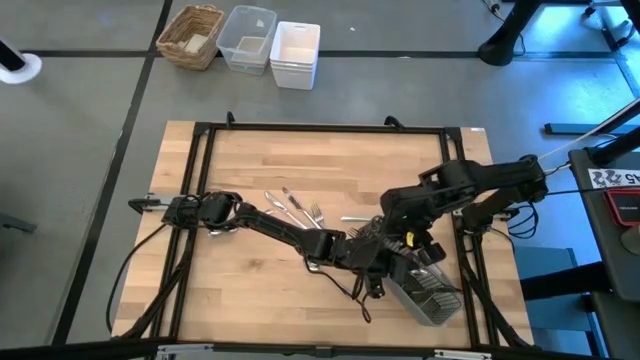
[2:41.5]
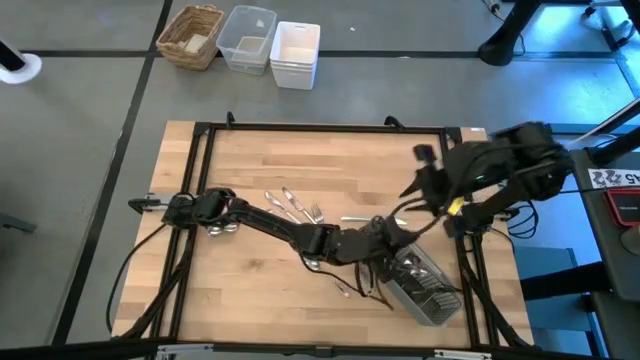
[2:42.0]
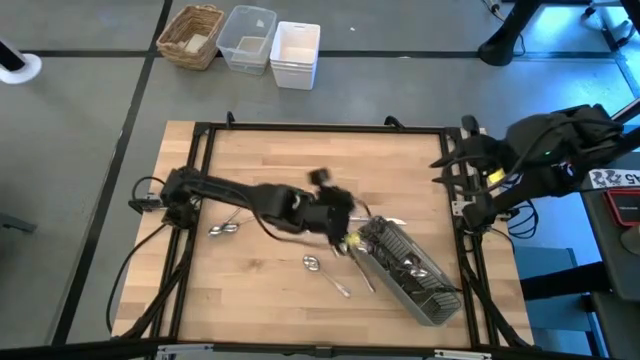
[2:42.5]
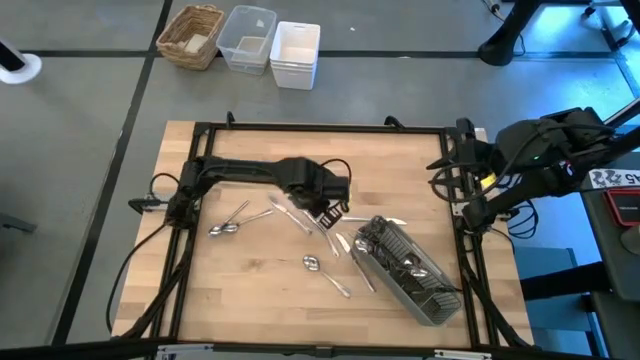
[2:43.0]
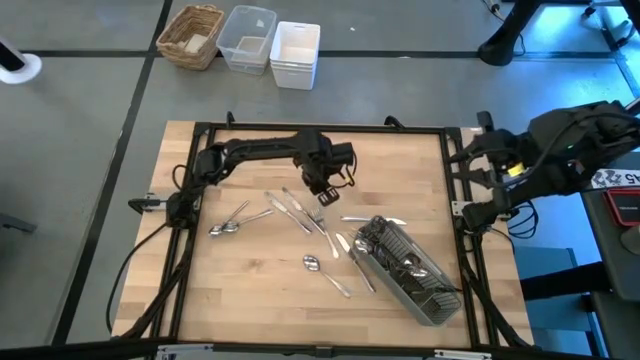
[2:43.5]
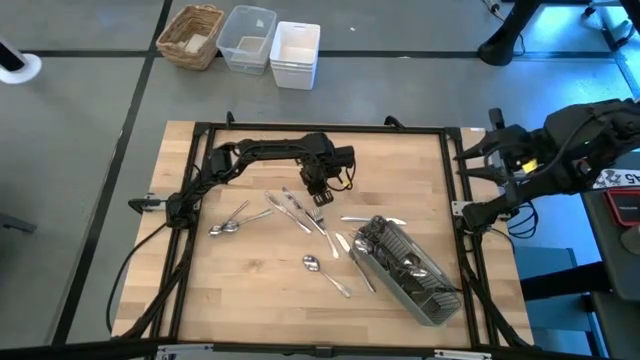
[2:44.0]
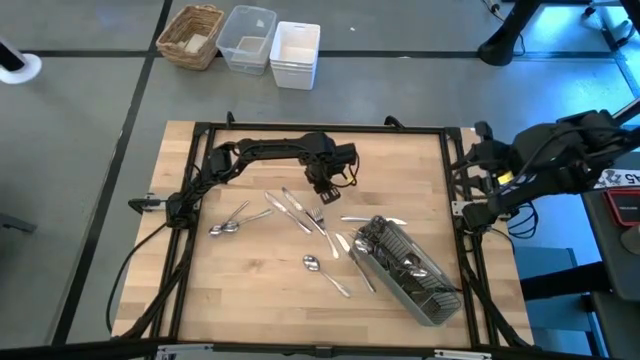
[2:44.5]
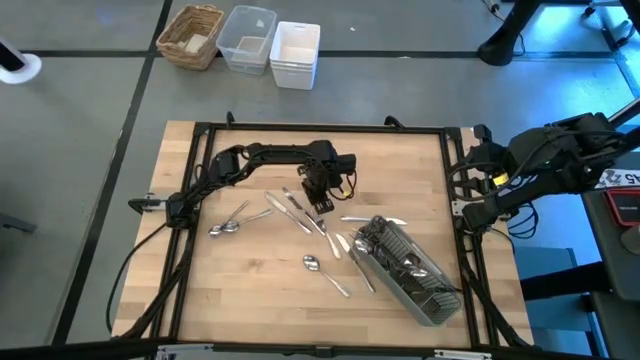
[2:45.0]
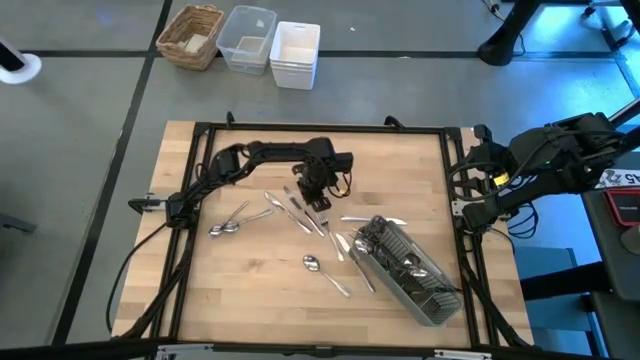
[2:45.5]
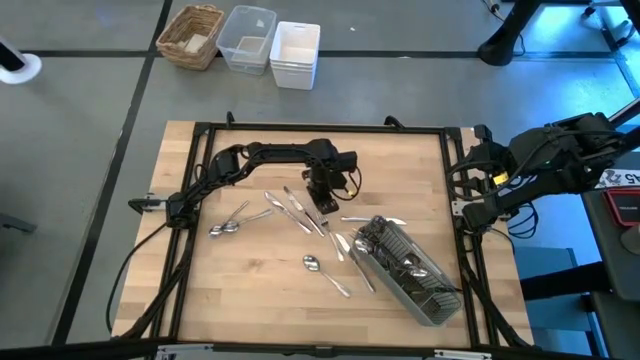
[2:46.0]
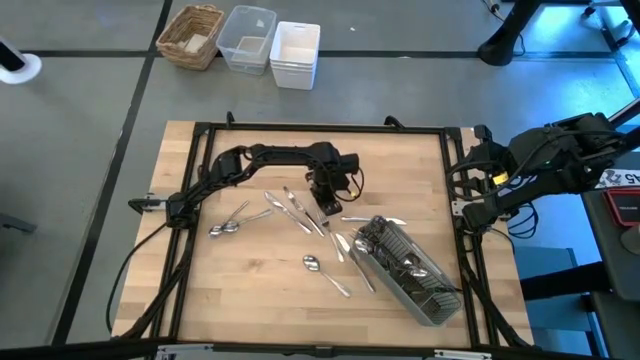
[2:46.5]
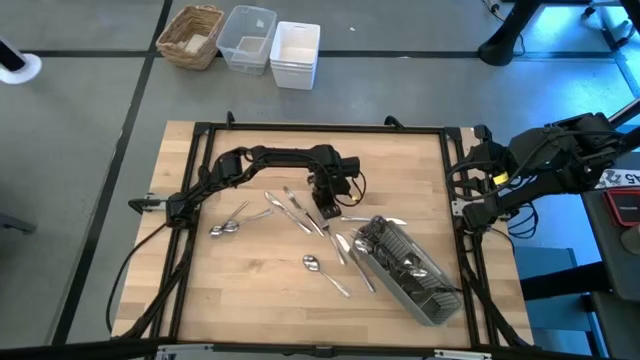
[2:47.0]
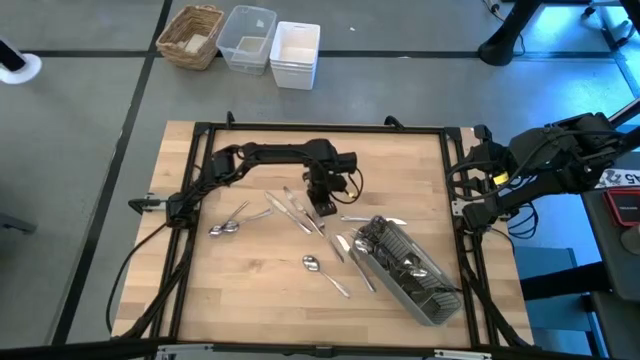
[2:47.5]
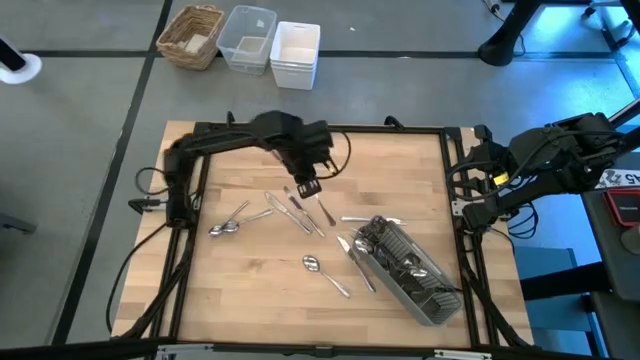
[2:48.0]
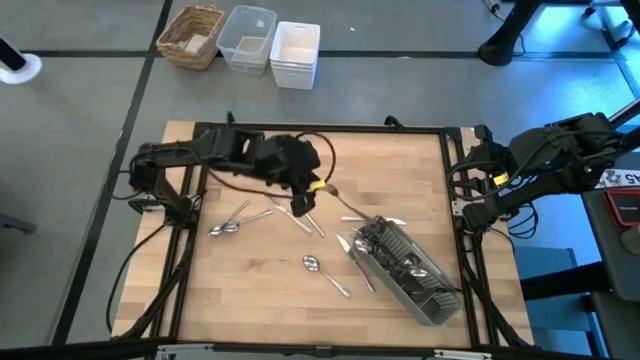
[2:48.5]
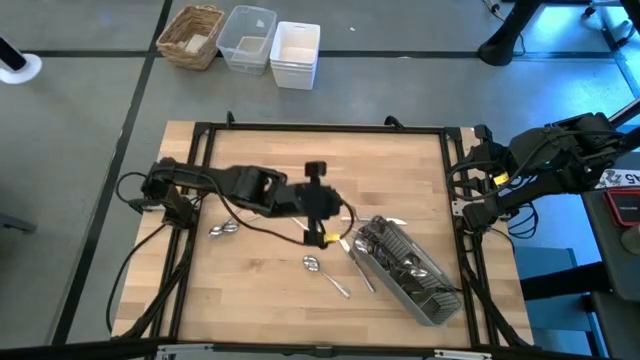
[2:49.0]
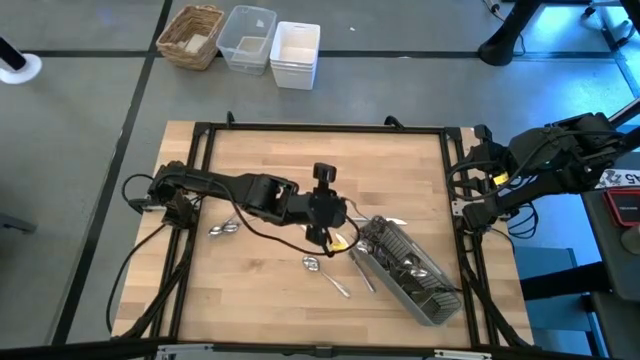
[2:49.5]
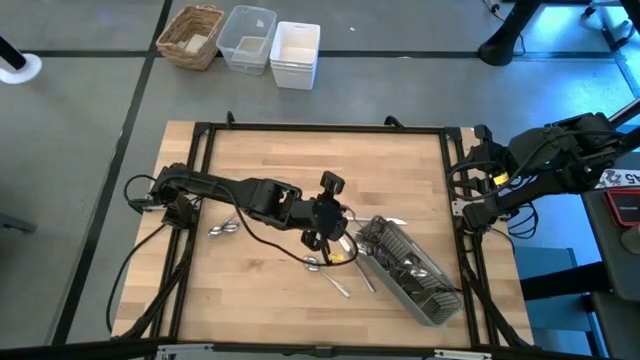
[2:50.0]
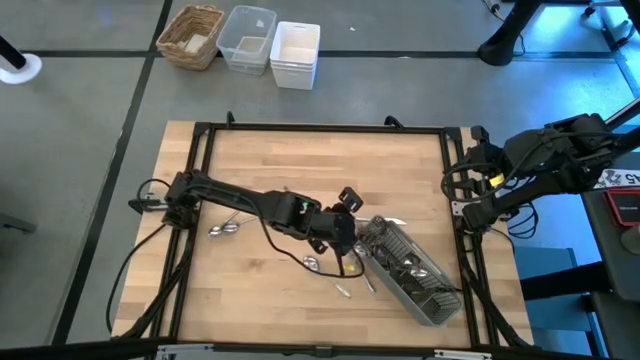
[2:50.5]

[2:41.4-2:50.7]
Task: Sort silverware
Put the silver fork into the gray silverware basket

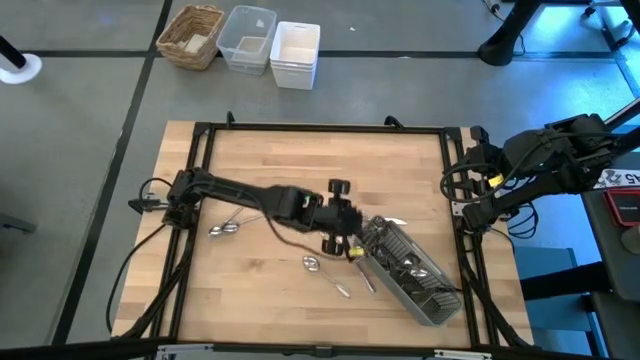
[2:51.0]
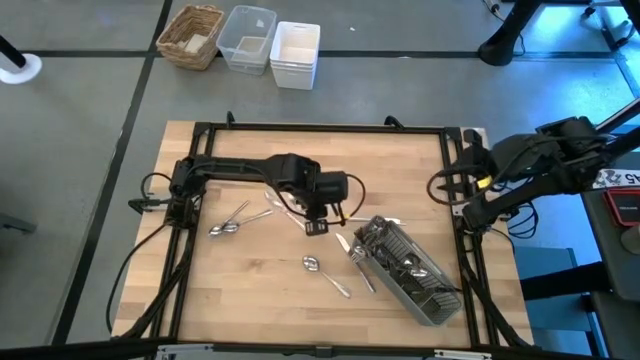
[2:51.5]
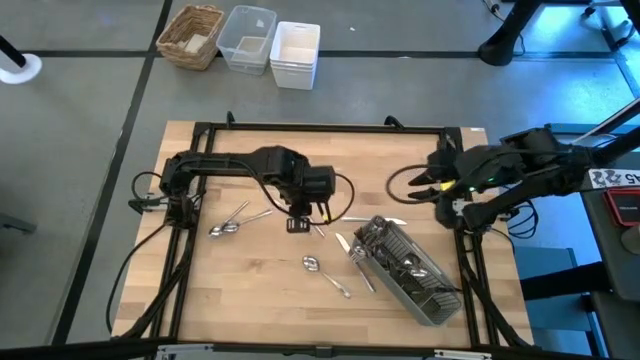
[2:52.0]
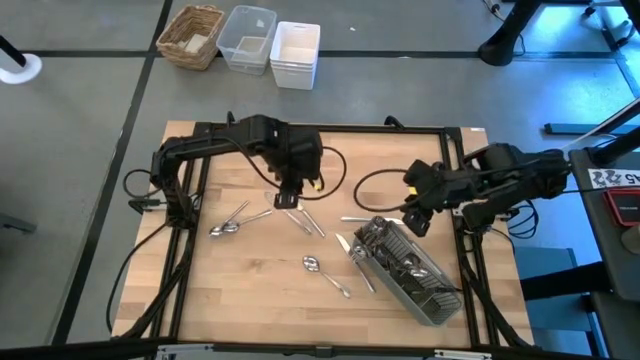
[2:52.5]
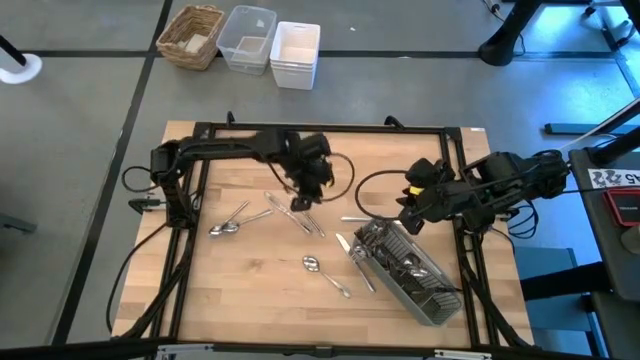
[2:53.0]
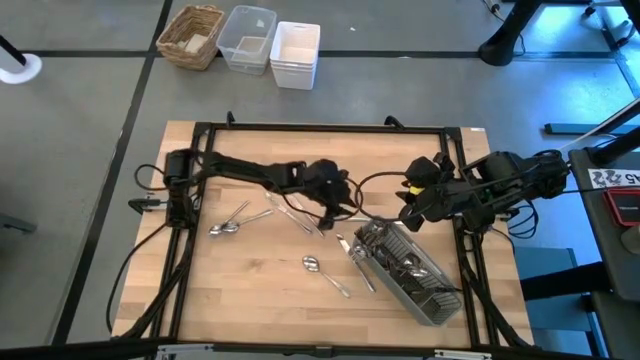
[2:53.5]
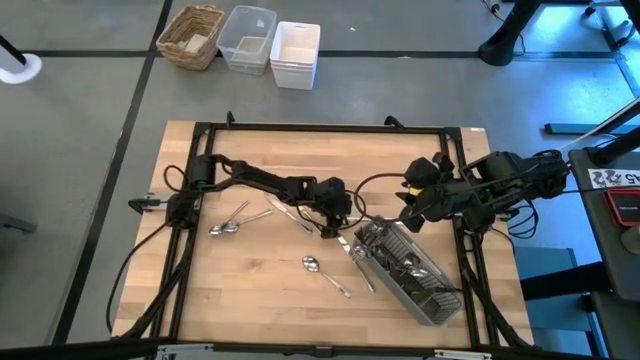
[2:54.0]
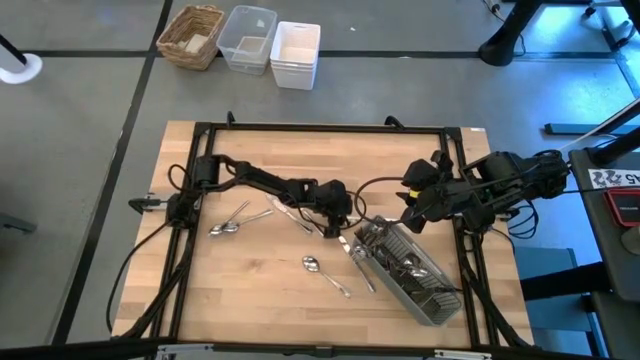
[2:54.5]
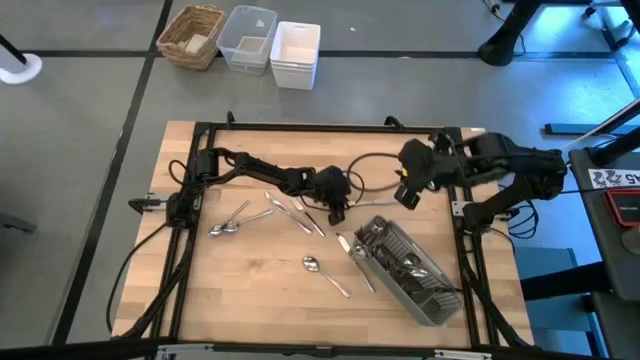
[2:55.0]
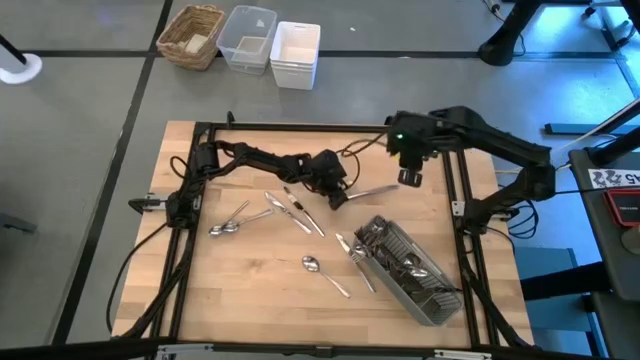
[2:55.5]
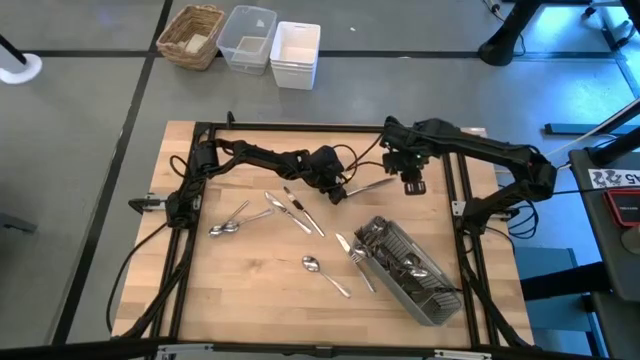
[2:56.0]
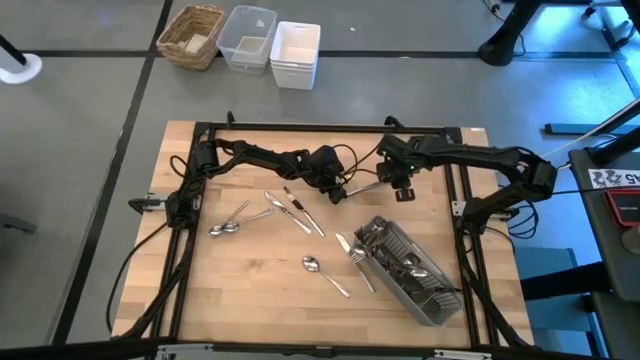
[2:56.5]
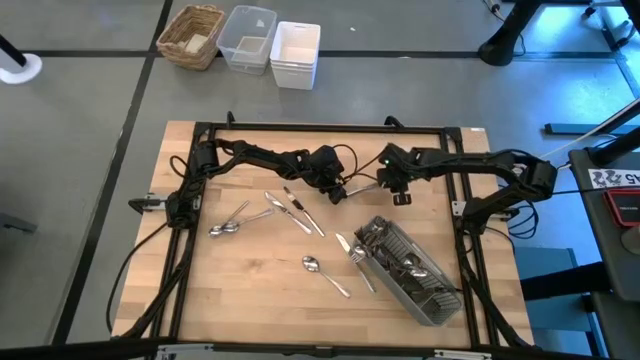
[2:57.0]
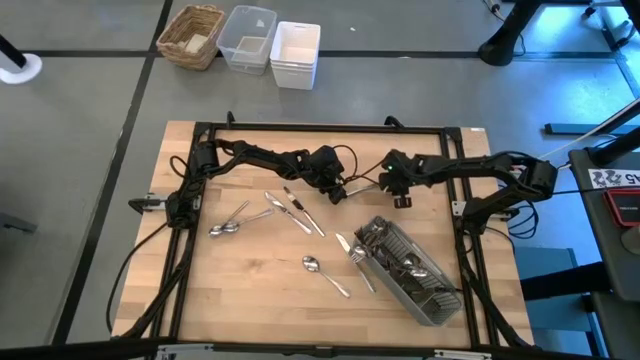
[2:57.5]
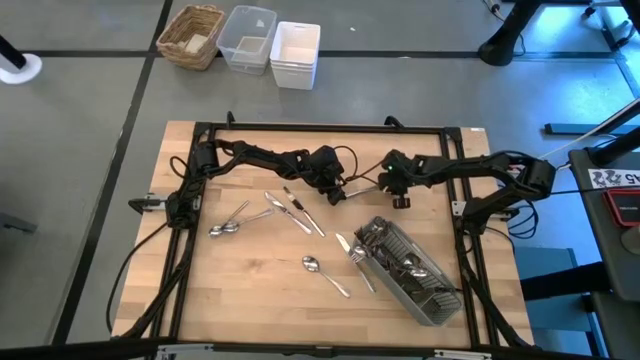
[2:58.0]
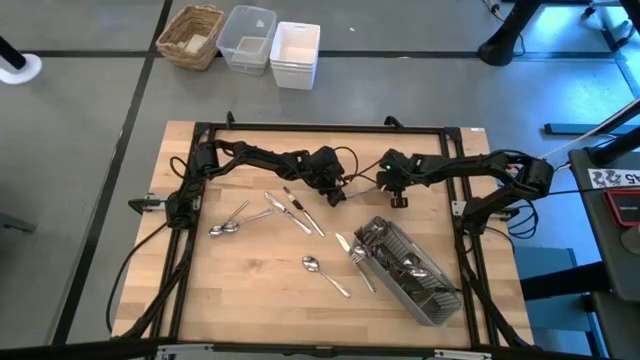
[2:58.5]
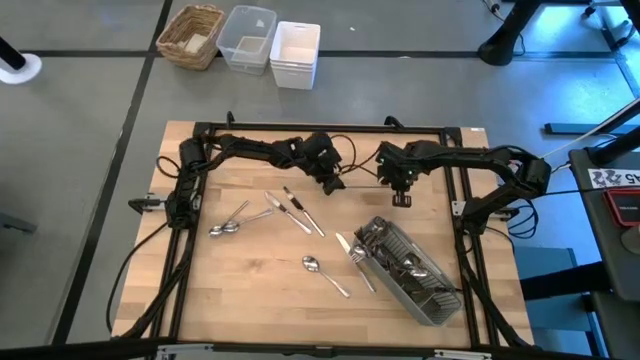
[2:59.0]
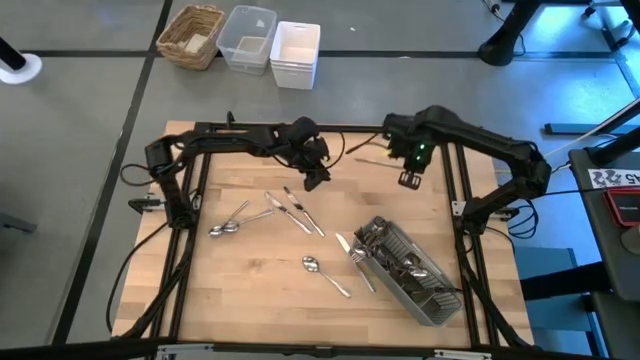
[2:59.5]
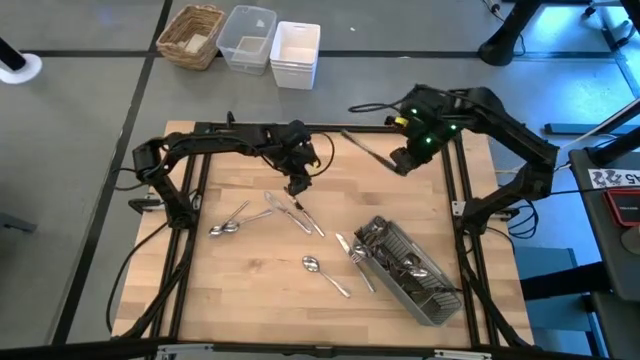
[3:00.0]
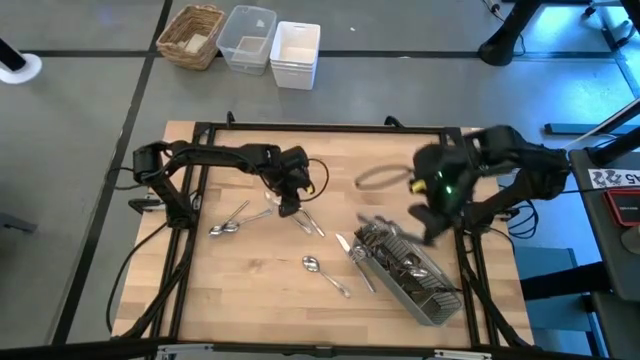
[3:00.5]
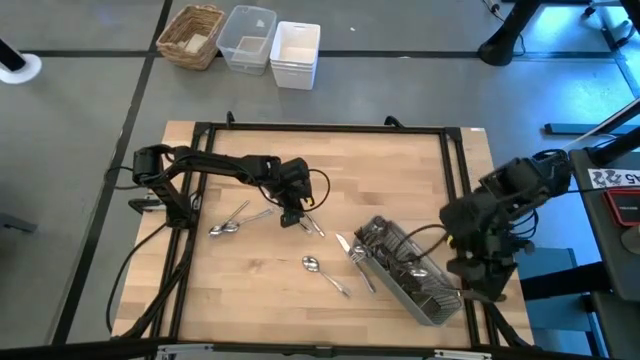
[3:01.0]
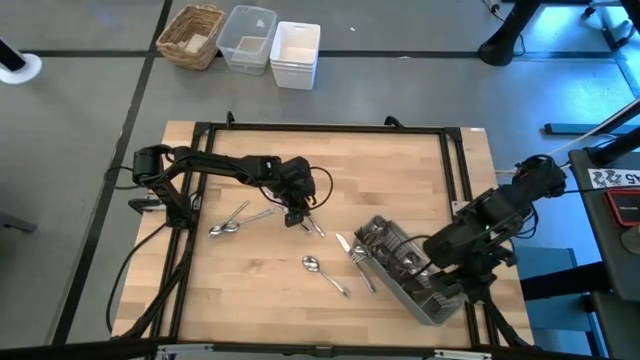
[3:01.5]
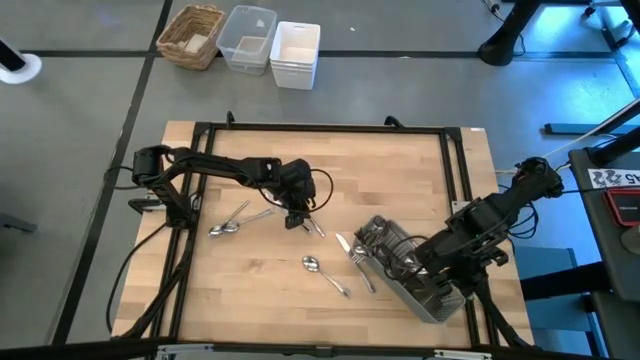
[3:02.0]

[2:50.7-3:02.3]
Put the silver table knife into the gray silverware basket
